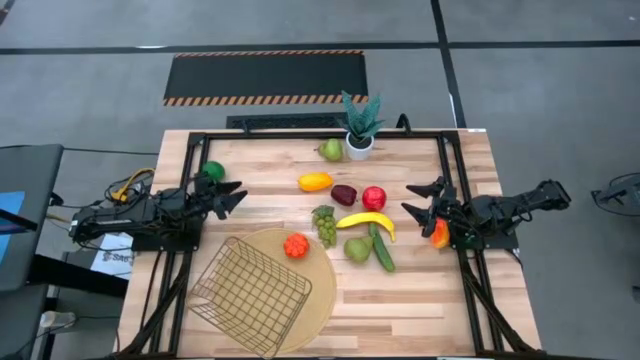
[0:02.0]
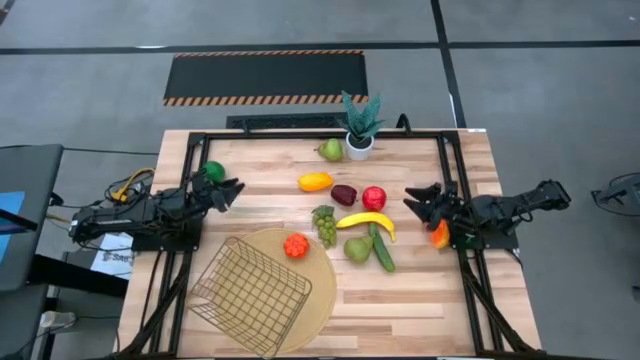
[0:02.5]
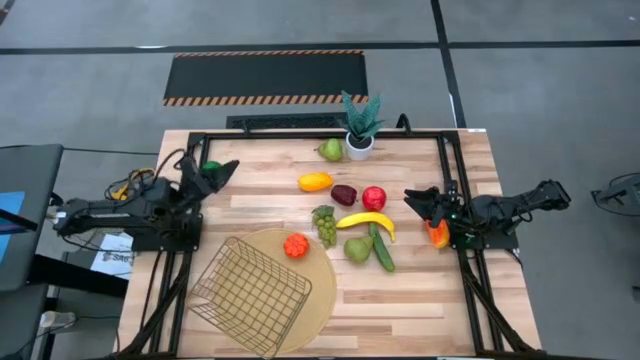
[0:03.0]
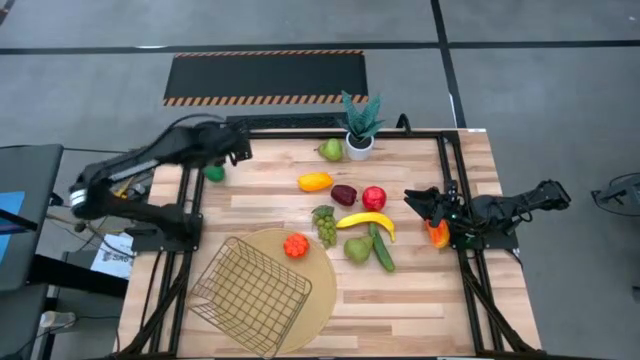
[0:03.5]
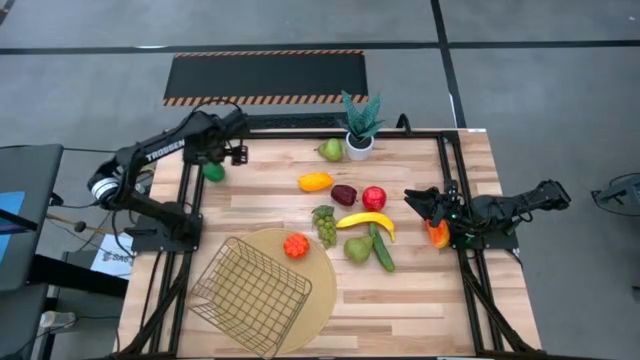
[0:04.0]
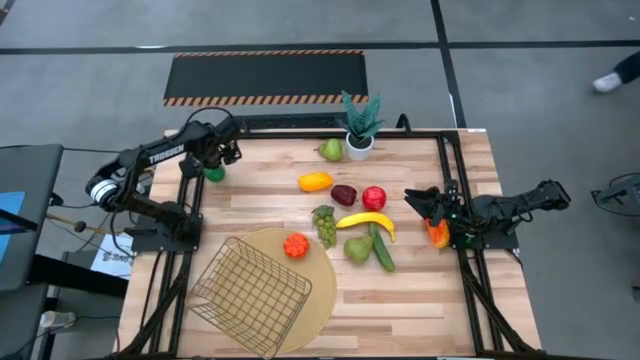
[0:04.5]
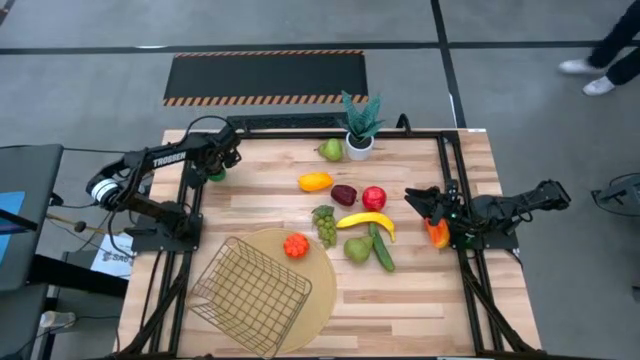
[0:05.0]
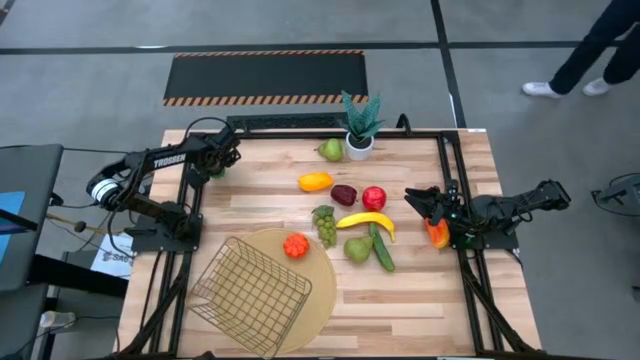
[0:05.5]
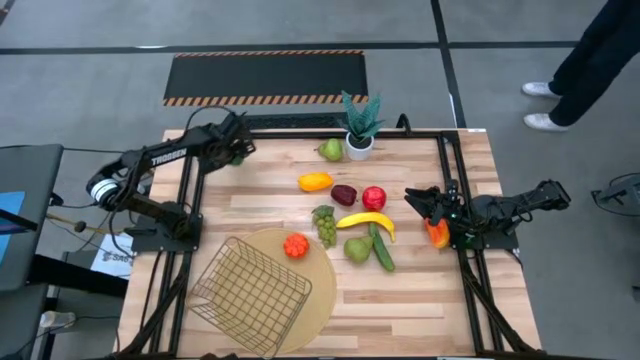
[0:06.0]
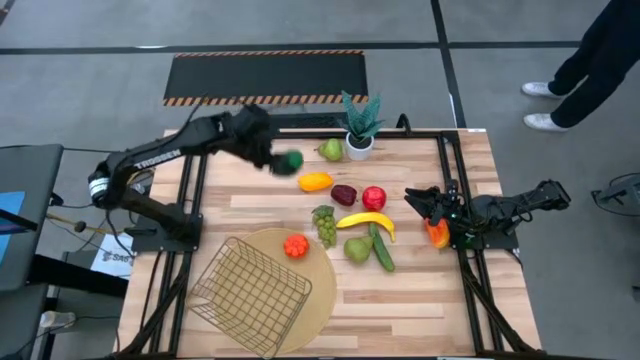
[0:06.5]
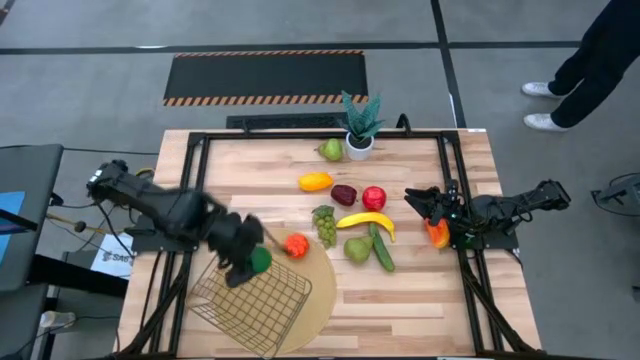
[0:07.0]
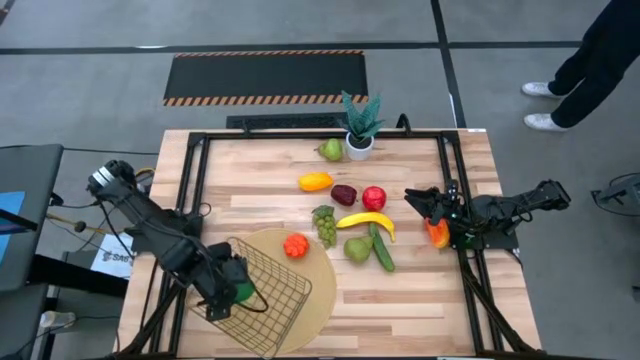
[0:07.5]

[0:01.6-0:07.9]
Task: Build produce basket
Put the lime into the mesh basket

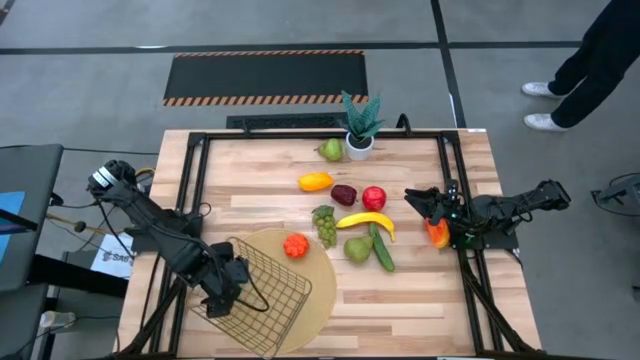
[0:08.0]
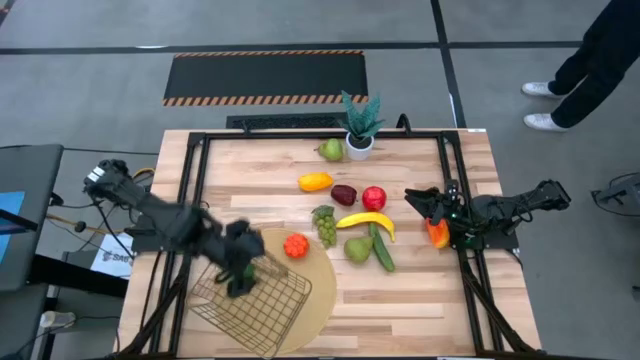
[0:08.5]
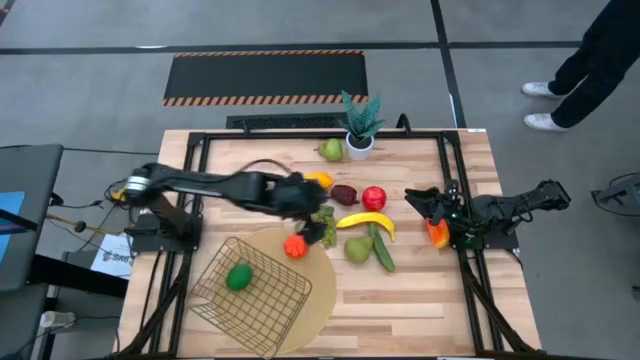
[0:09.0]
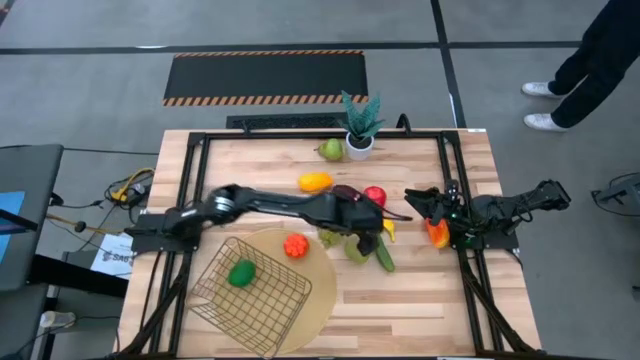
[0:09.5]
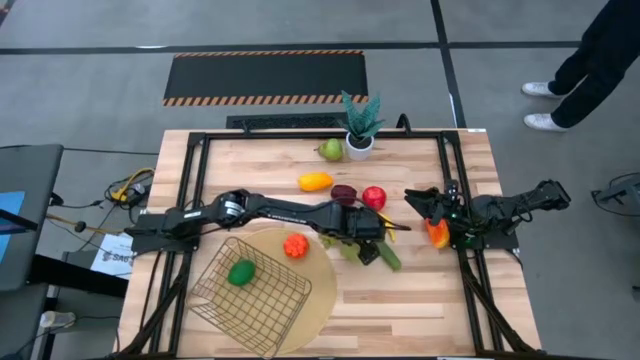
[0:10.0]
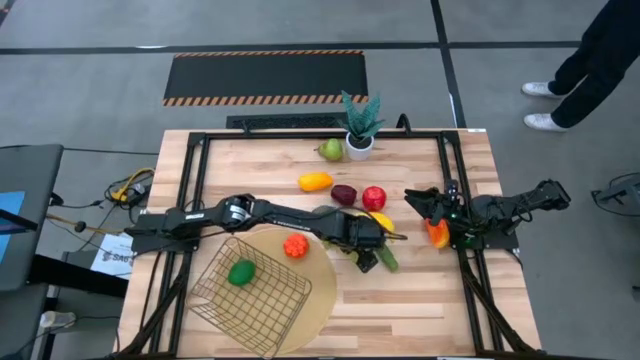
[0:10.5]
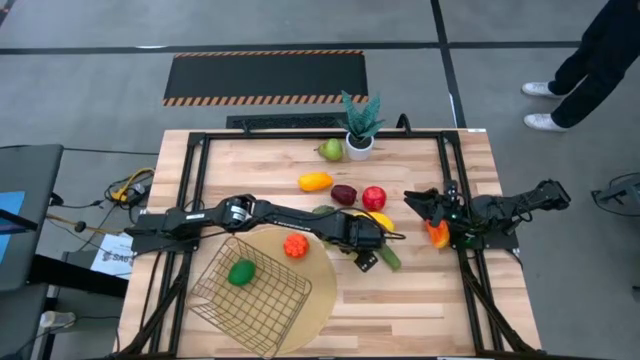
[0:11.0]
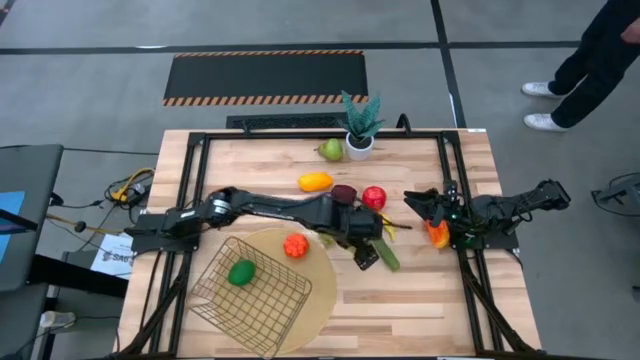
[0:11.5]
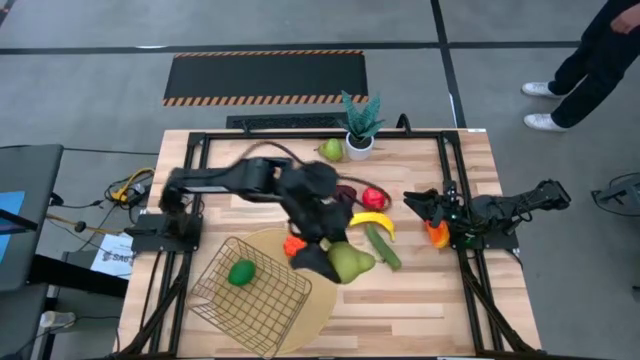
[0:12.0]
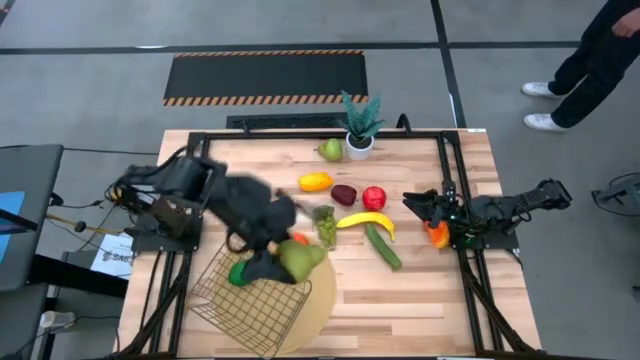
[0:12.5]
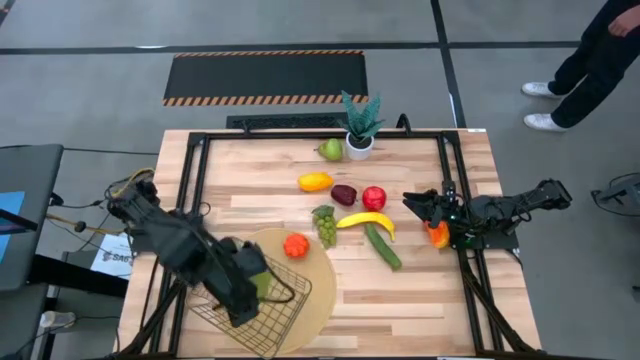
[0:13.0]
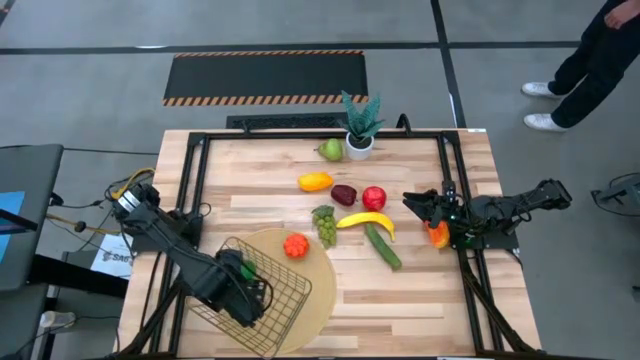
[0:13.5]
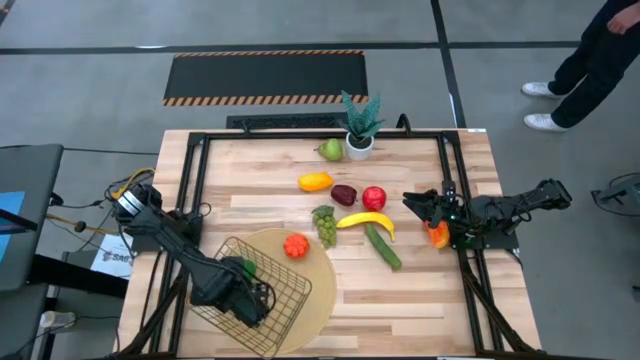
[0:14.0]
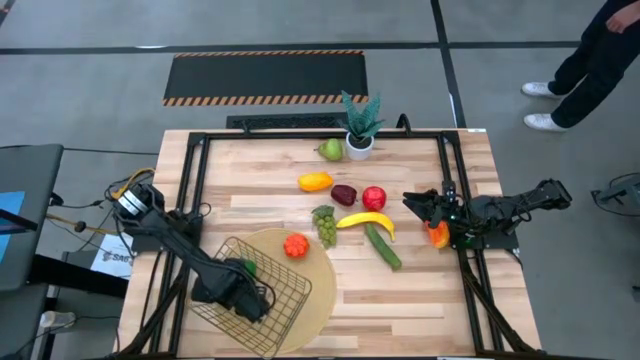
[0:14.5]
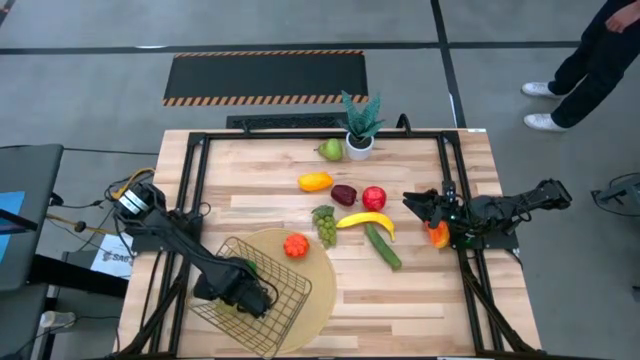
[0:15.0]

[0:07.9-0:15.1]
Put the bottom pear into the mesh basket

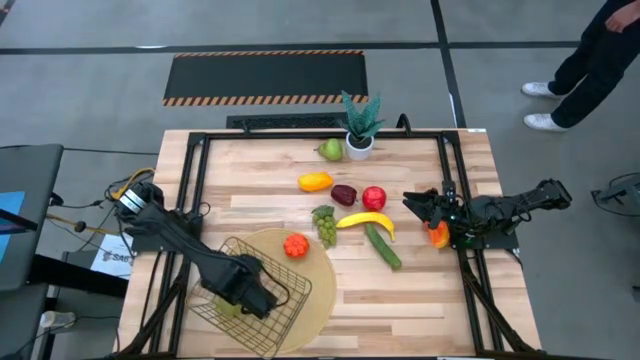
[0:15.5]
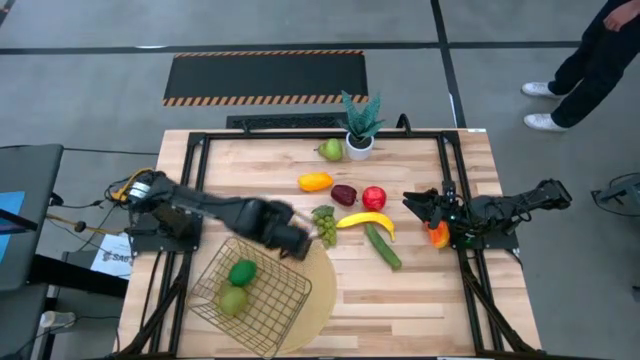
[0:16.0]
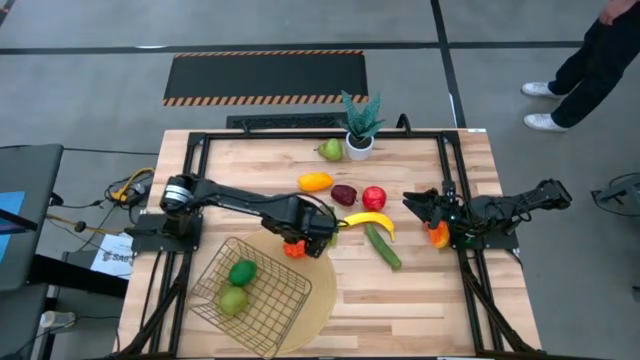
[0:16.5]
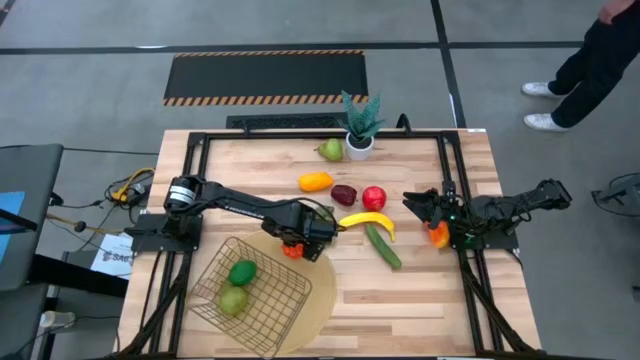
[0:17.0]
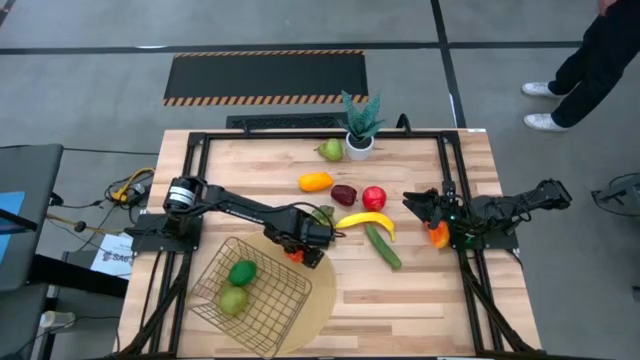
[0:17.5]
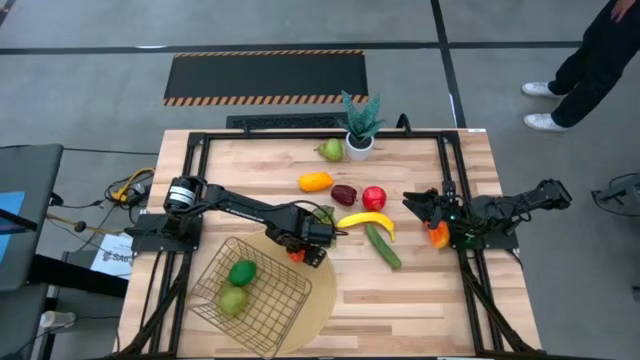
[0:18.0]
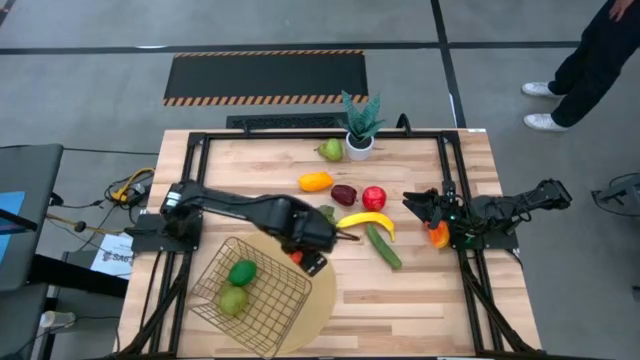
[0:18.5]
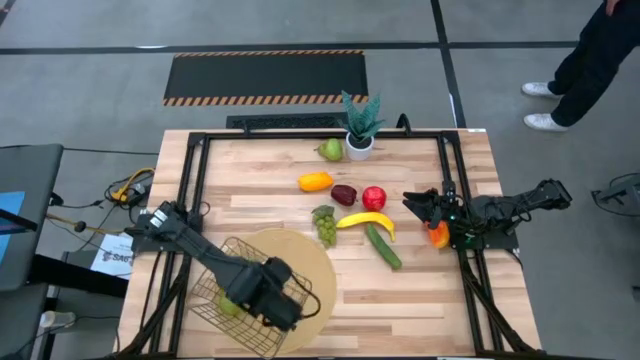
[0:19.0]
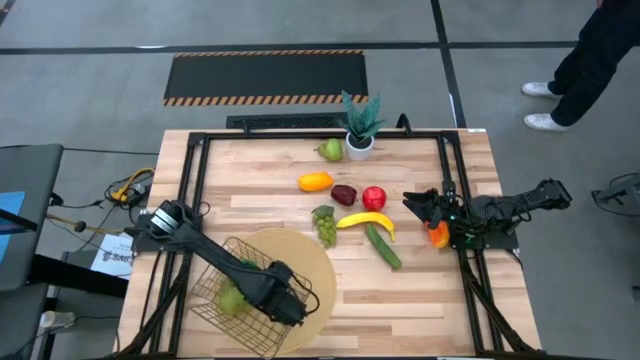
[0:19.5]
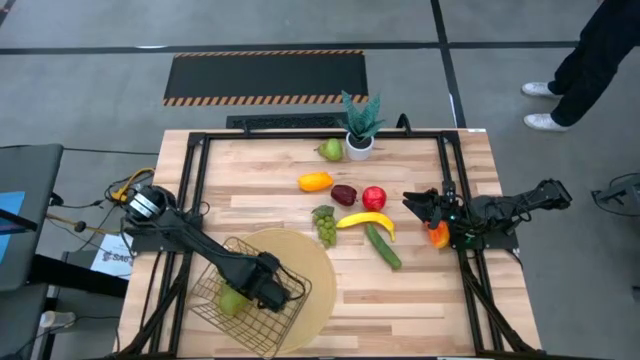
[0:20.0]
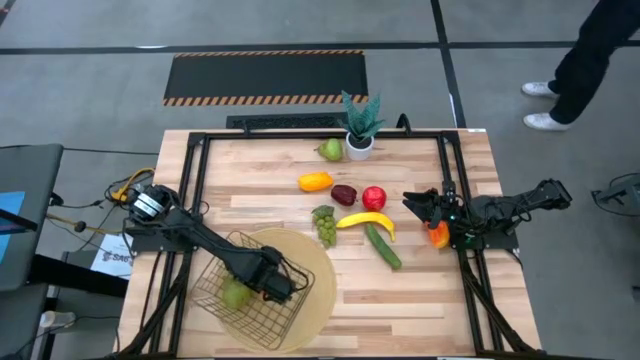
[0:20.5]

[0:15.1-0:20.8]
Put the pumpkin into the mesh basket
